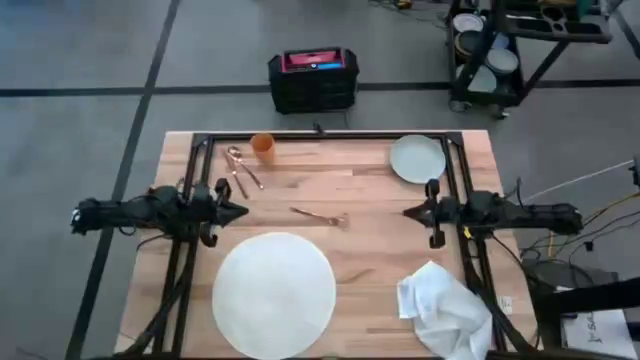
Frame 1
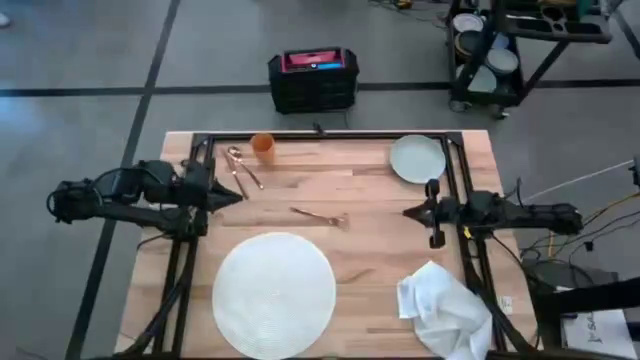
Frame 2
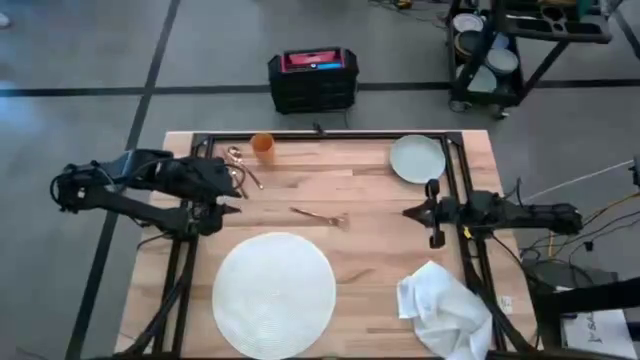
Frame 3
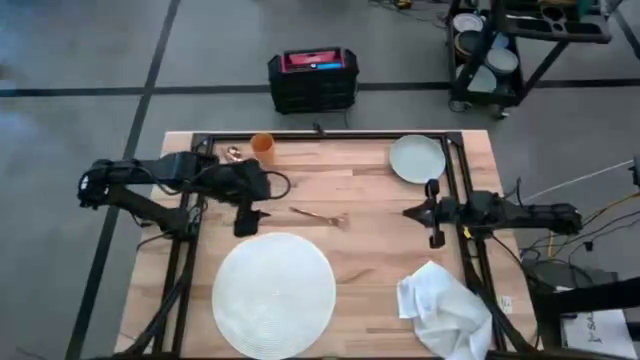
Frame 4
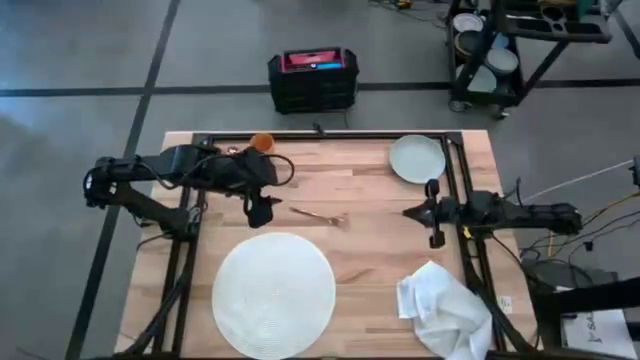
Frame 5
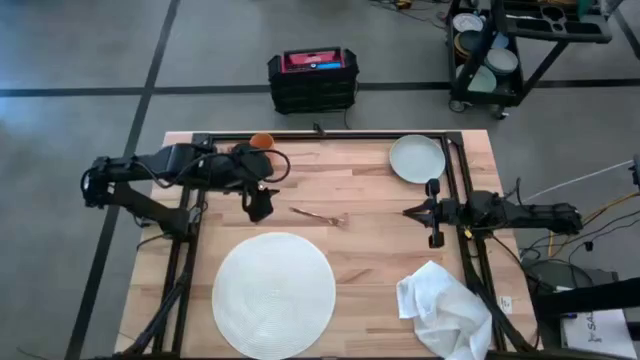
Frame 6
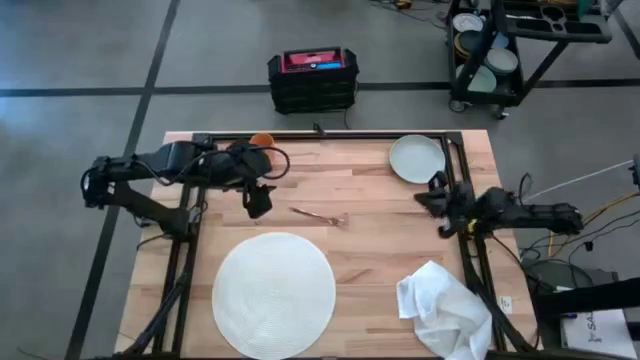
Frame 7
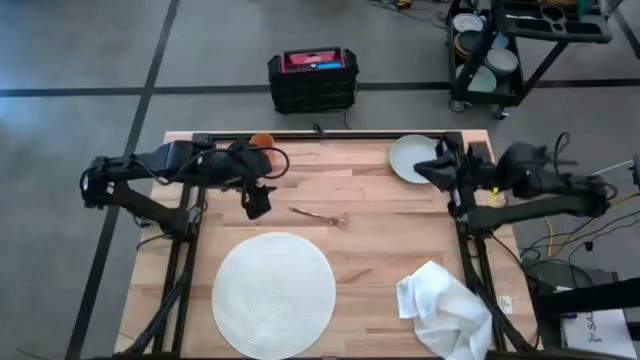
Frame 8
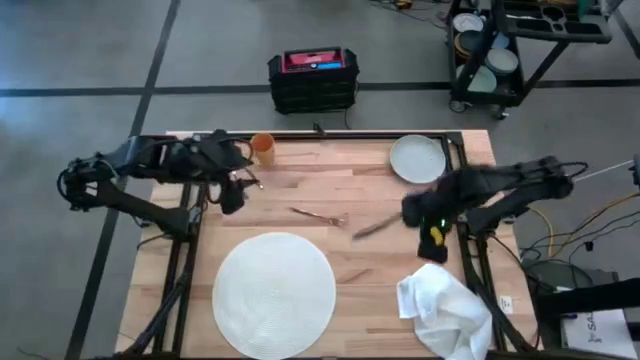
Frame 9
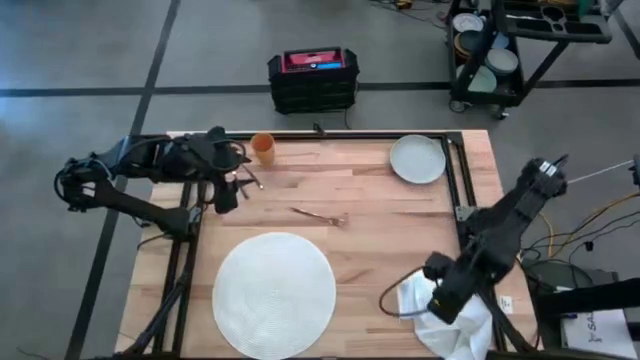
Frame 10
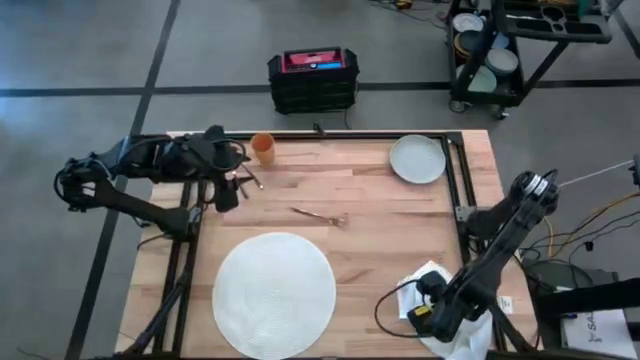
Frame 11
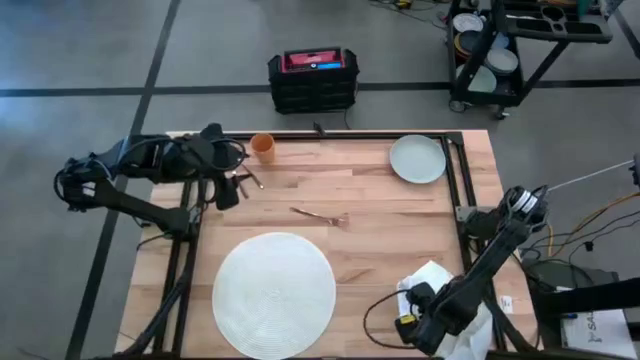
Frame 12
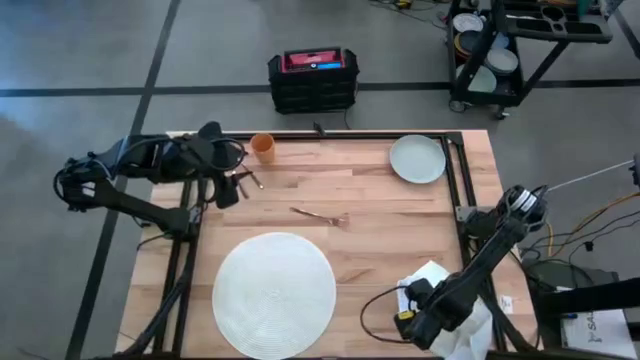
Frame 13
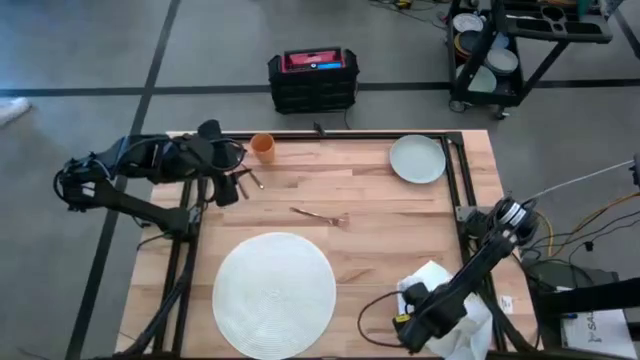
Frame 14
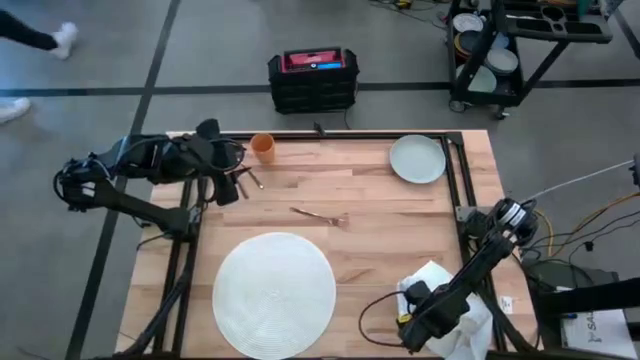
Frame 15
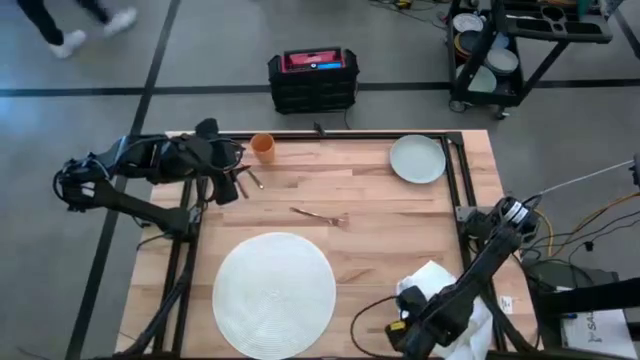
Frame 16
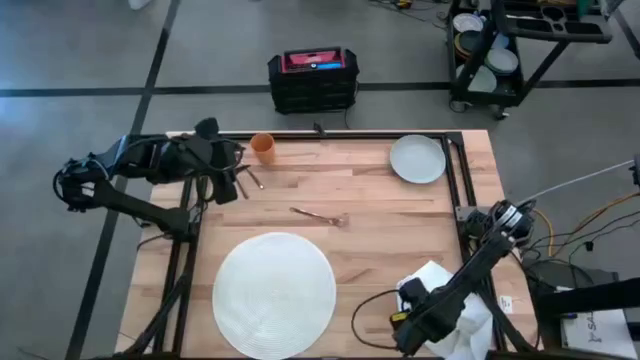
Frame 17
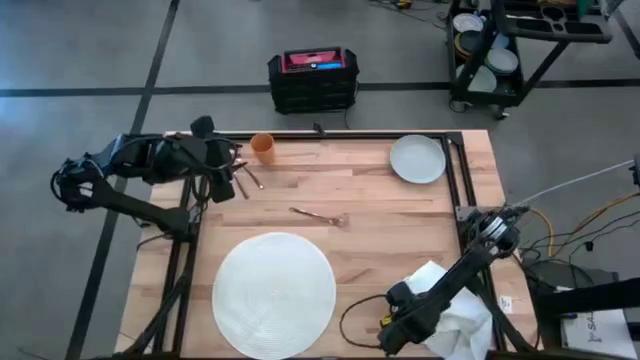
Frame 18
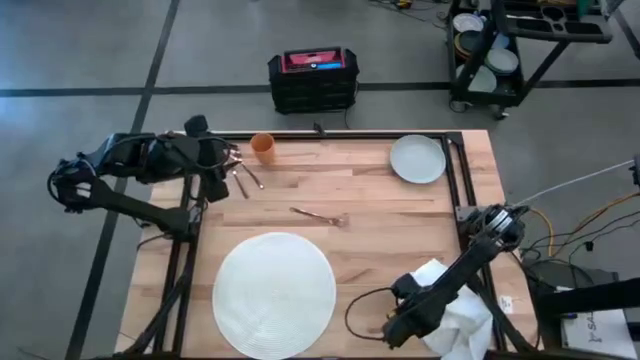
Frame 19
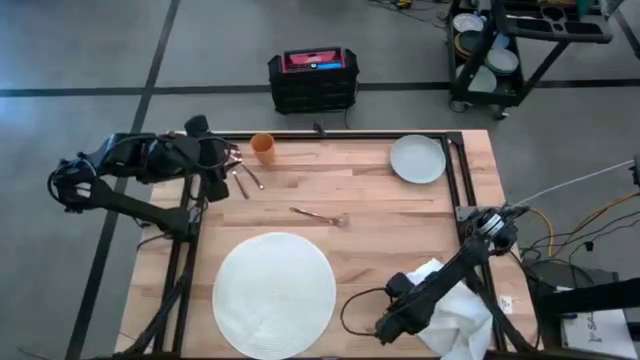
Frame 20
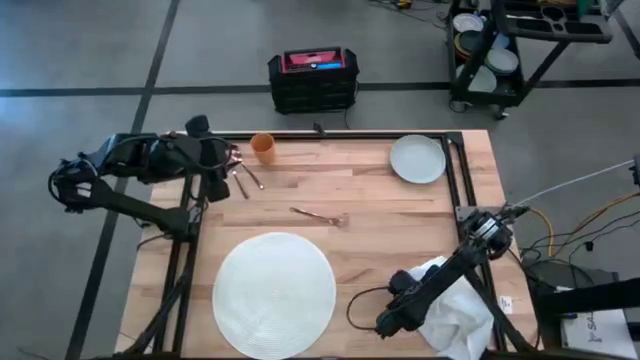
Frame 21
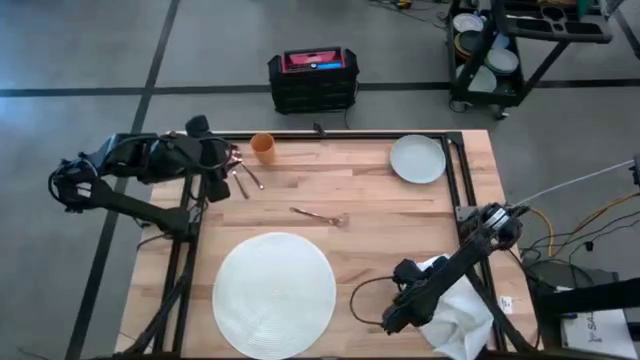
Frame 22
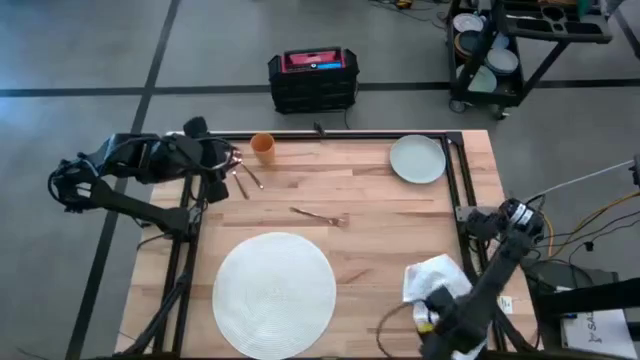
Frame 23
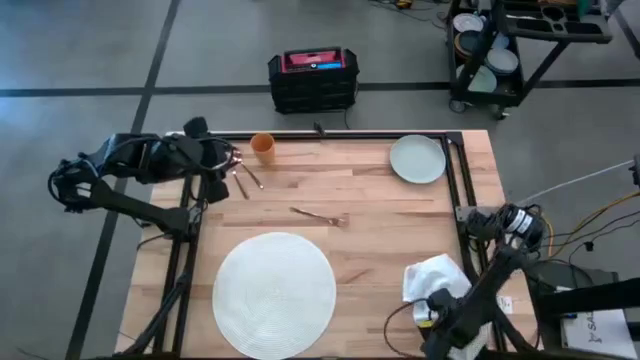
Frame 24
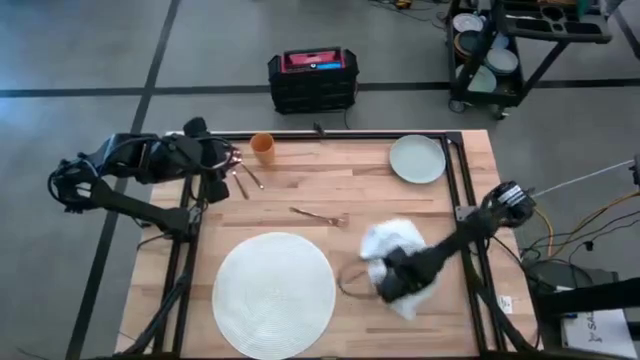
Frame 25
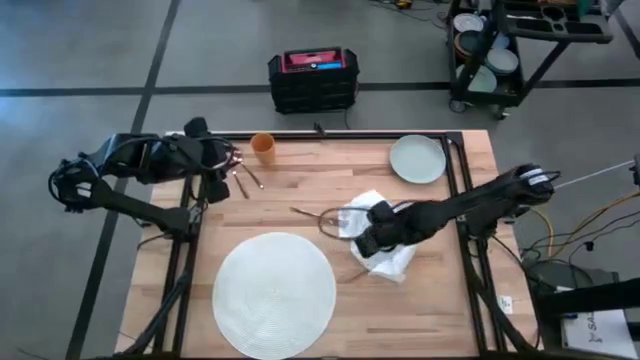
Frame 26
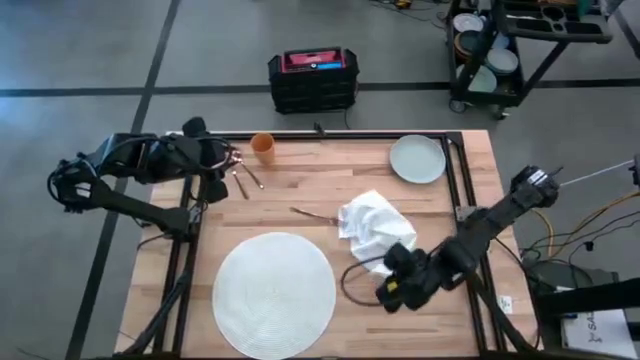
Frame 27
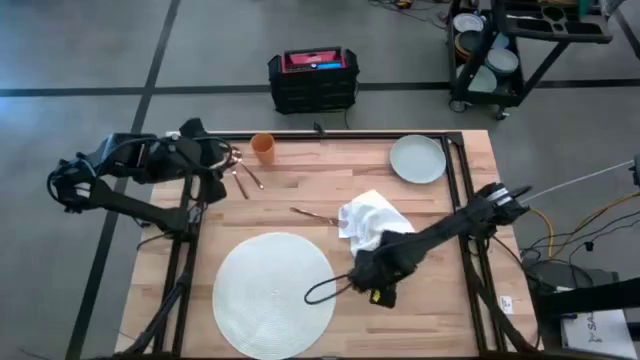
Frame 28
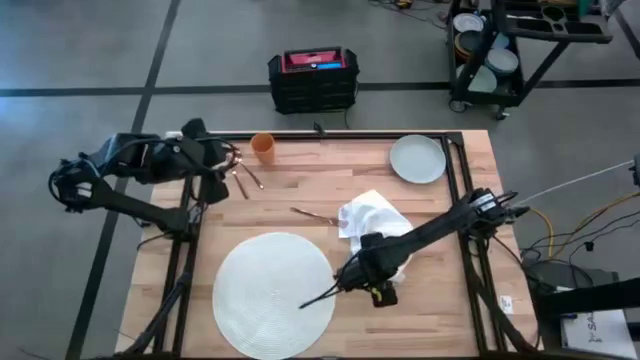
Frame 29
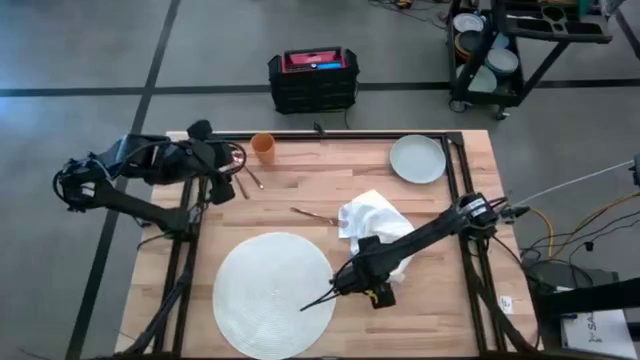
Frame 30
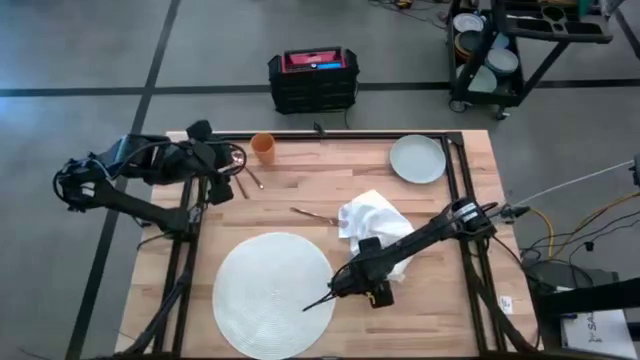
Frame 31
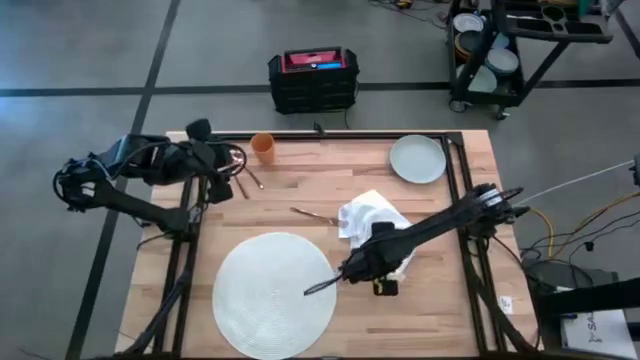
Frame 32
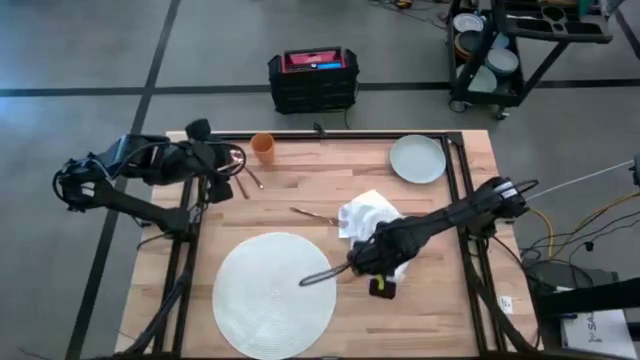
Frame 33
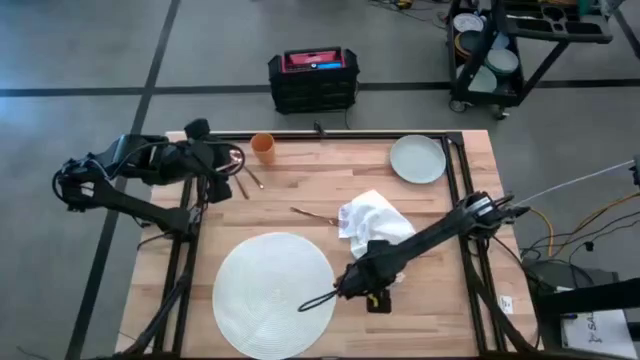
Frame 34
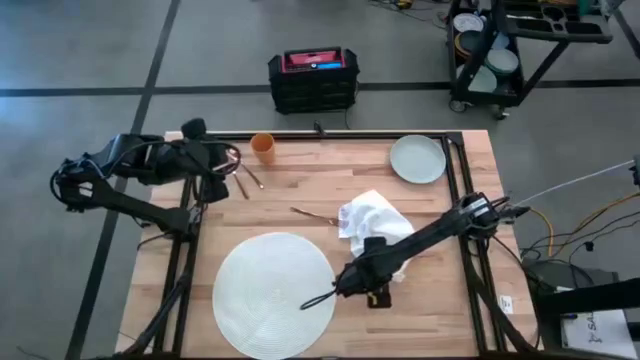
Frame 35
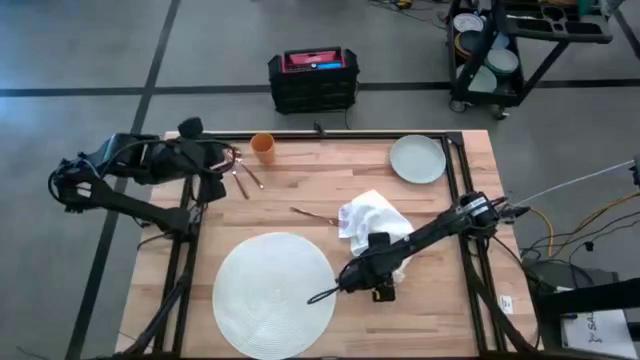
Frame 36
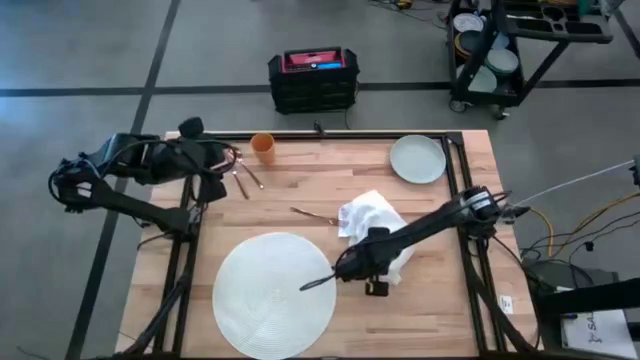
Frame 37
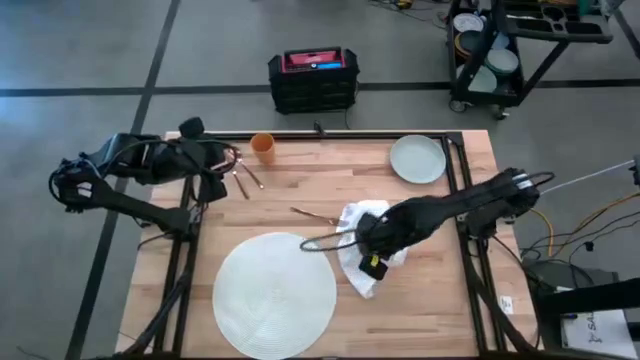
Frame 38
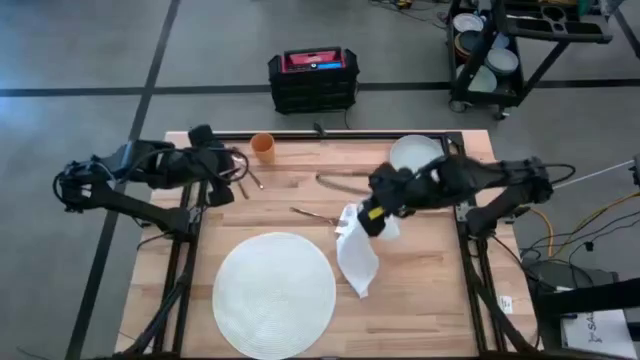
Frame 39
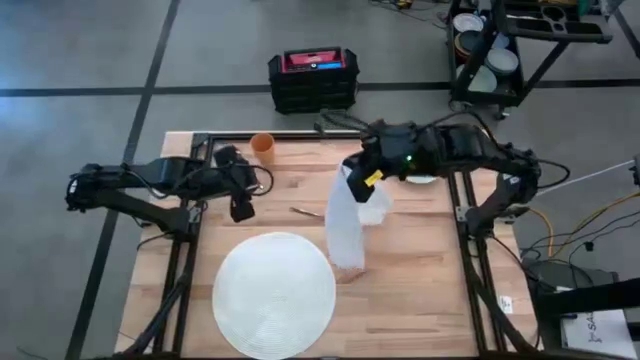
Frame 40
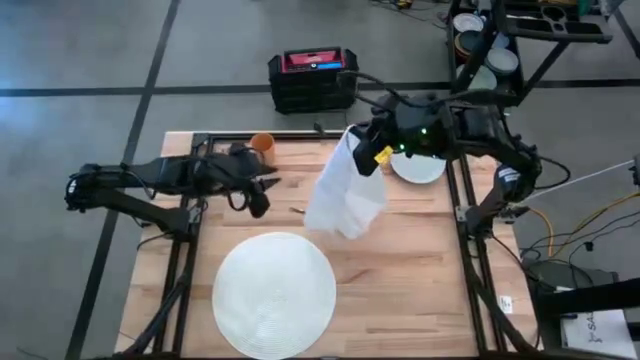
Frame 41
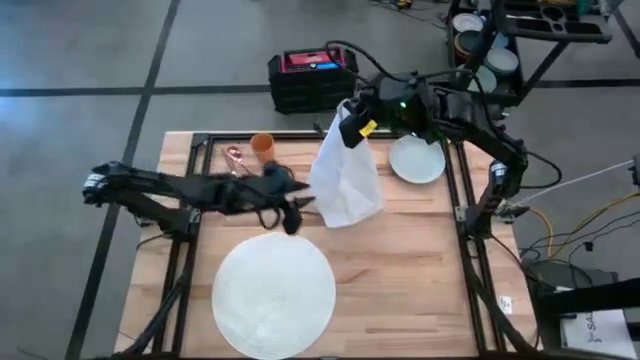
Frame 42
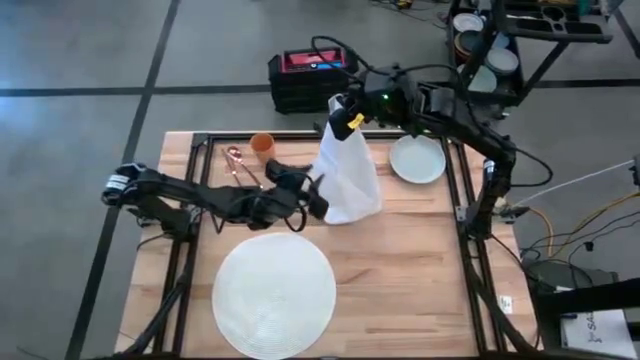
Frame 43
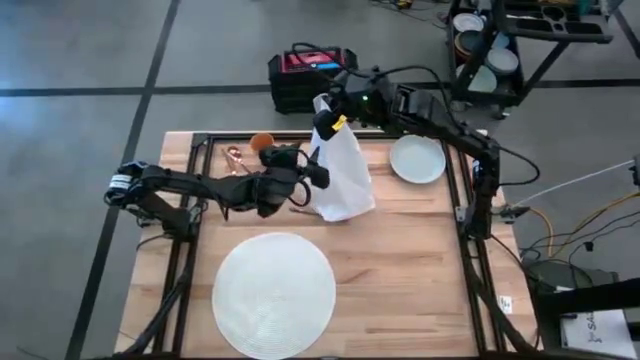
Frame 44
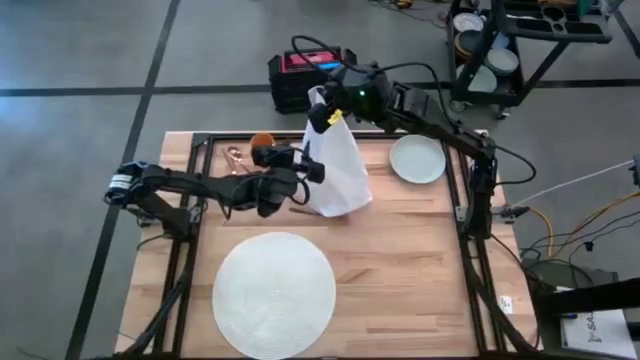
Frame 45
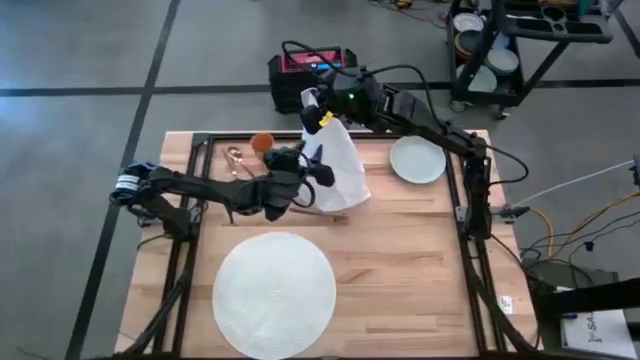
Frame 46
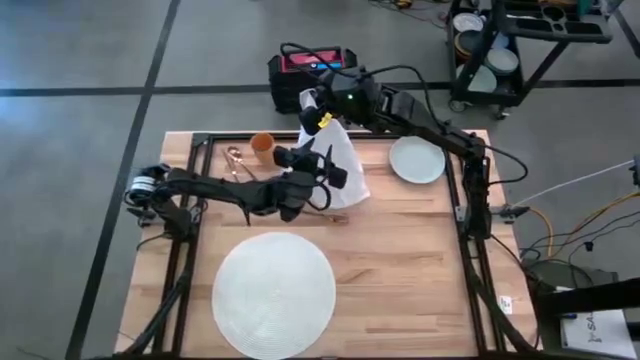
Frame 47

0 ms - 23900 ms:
Task: Set table place
Fold the white napkin
